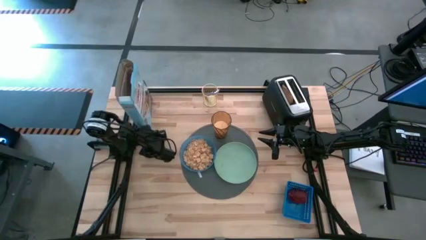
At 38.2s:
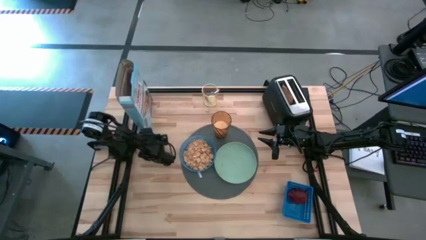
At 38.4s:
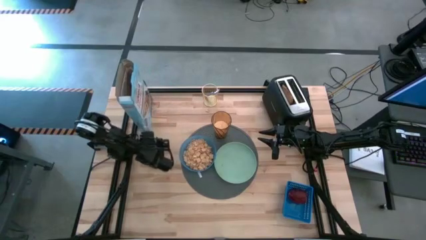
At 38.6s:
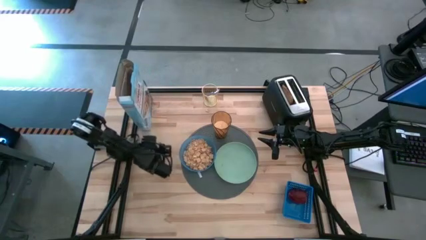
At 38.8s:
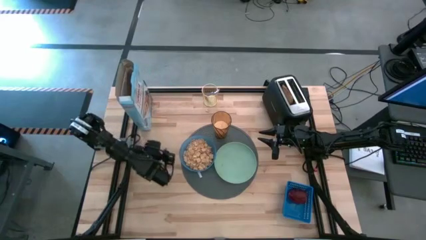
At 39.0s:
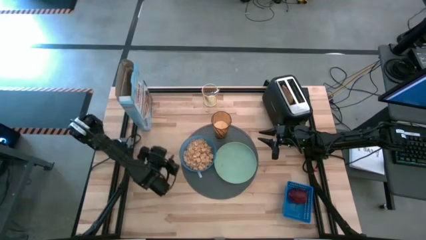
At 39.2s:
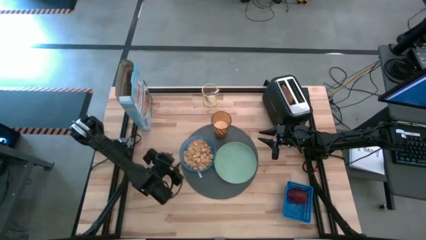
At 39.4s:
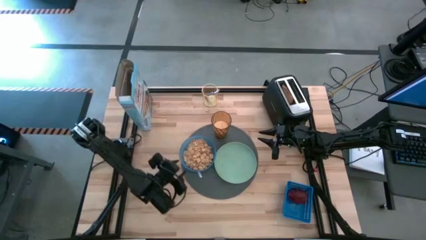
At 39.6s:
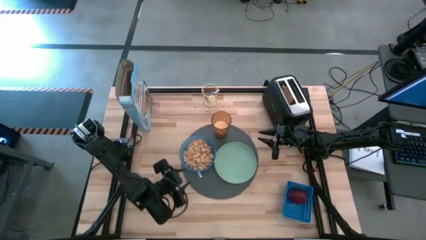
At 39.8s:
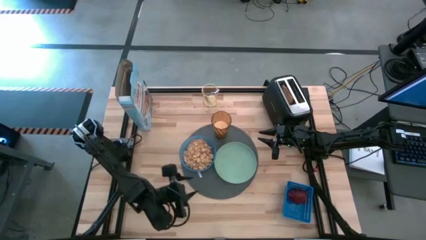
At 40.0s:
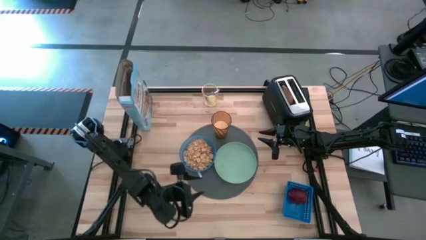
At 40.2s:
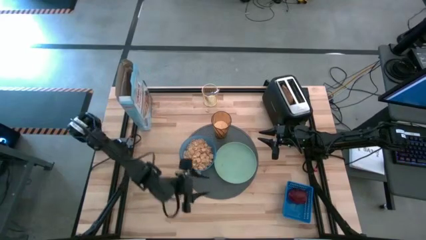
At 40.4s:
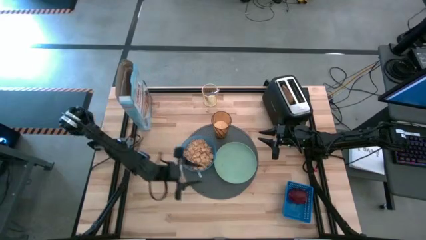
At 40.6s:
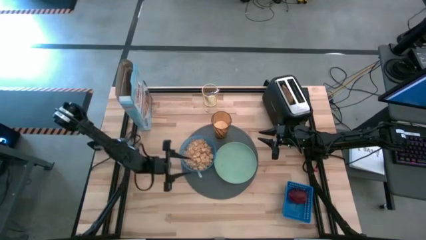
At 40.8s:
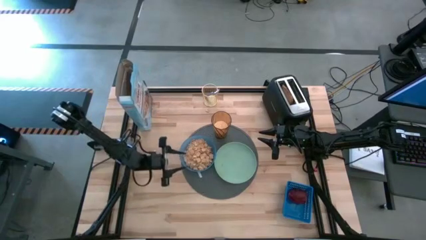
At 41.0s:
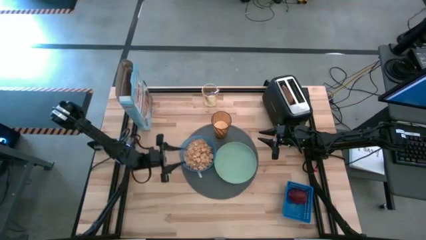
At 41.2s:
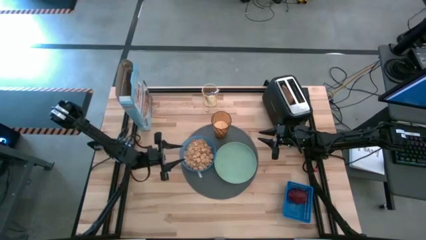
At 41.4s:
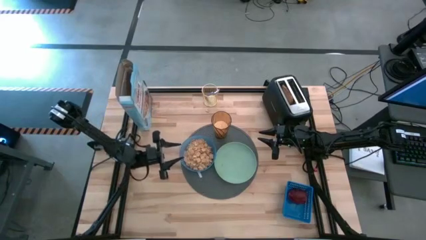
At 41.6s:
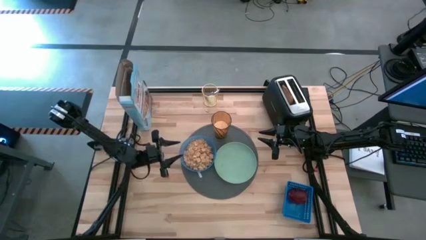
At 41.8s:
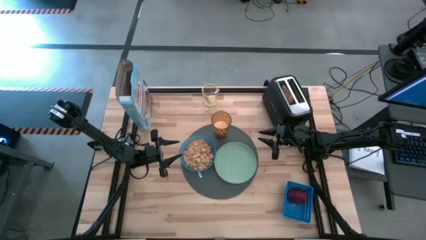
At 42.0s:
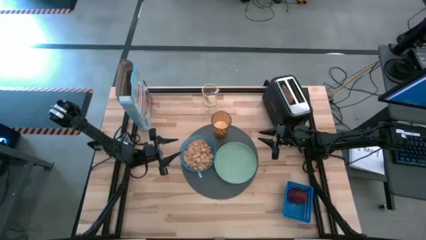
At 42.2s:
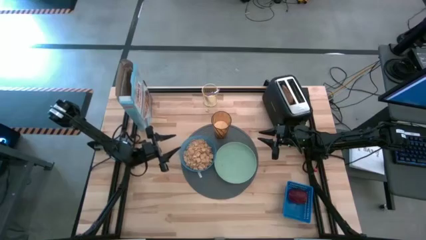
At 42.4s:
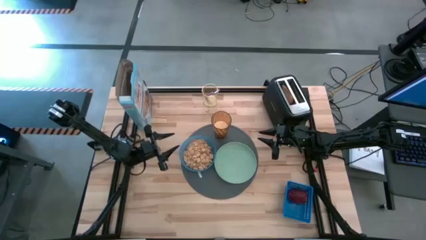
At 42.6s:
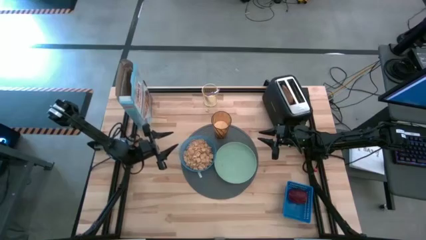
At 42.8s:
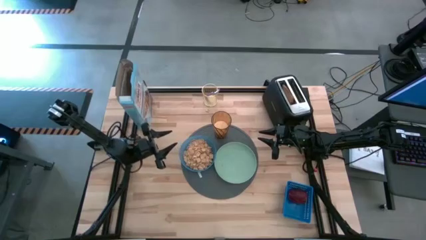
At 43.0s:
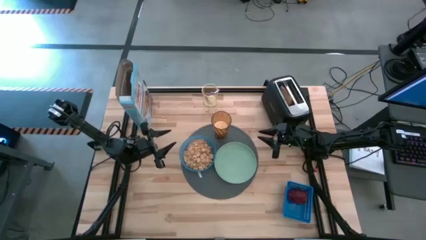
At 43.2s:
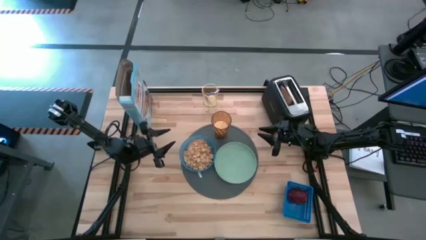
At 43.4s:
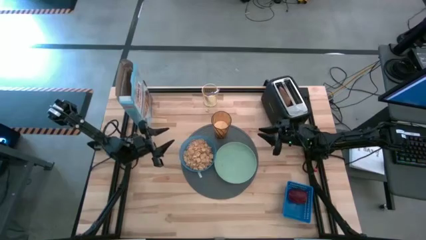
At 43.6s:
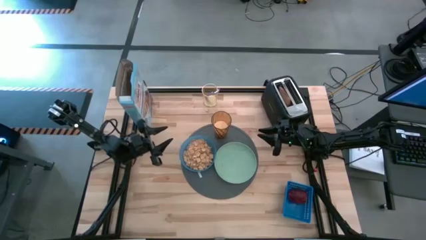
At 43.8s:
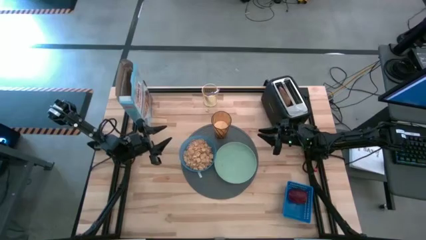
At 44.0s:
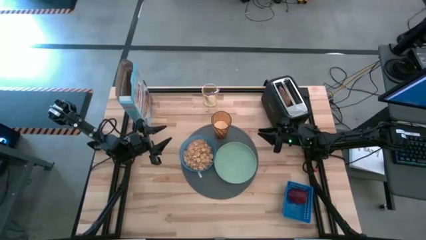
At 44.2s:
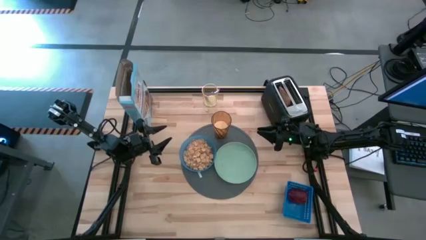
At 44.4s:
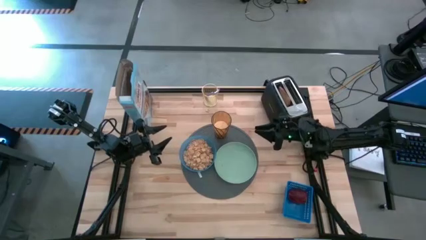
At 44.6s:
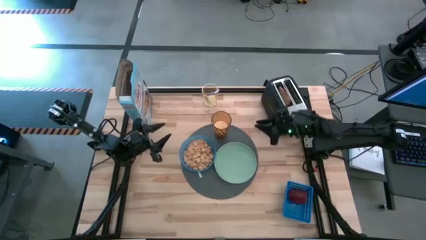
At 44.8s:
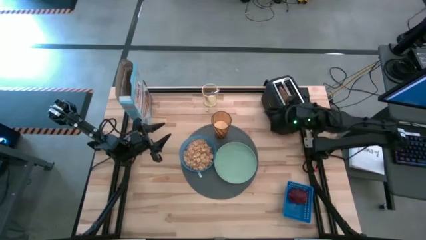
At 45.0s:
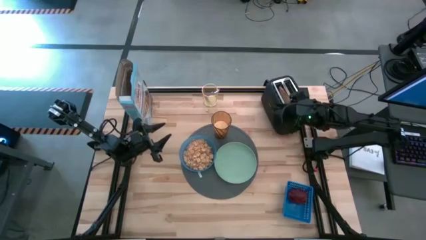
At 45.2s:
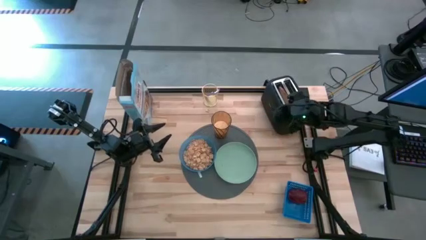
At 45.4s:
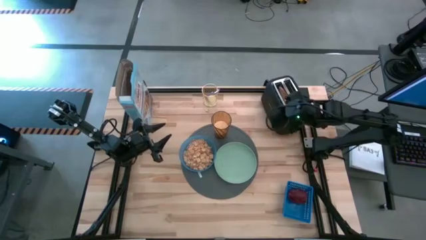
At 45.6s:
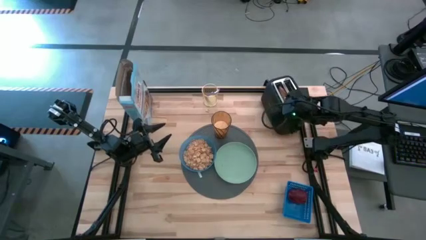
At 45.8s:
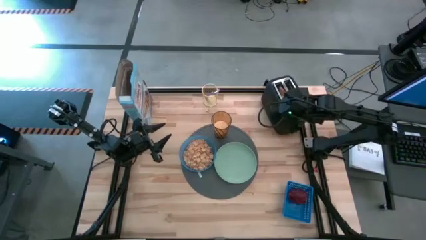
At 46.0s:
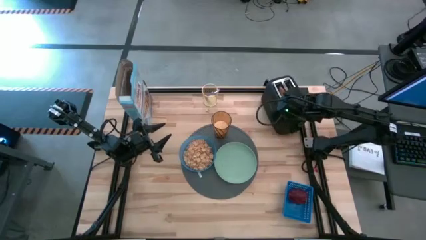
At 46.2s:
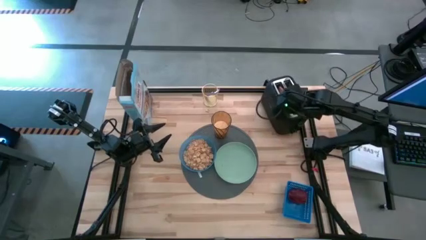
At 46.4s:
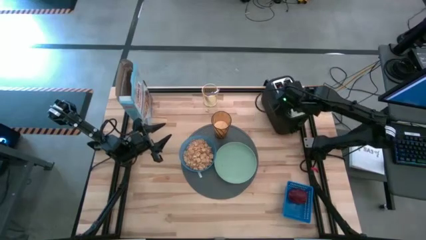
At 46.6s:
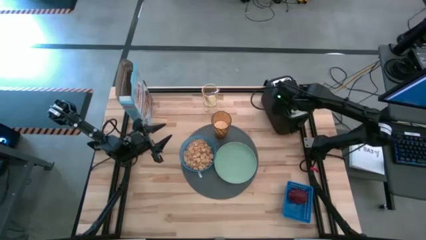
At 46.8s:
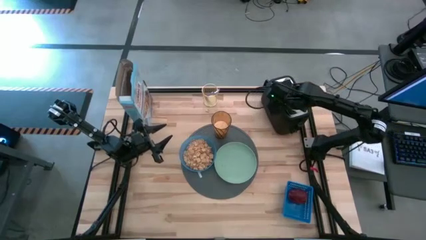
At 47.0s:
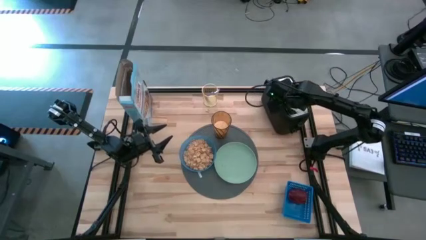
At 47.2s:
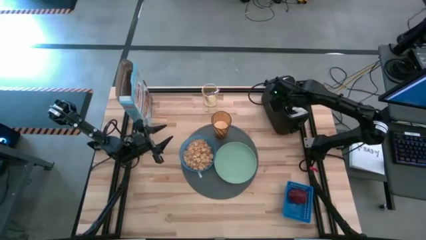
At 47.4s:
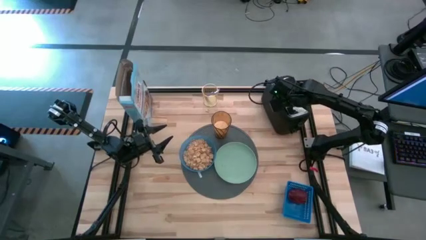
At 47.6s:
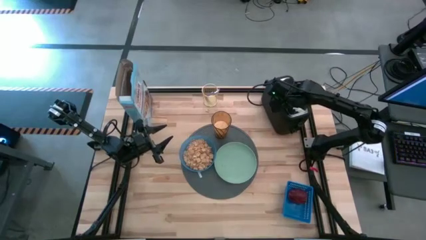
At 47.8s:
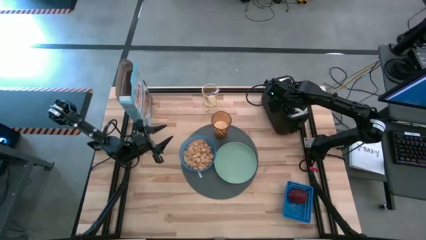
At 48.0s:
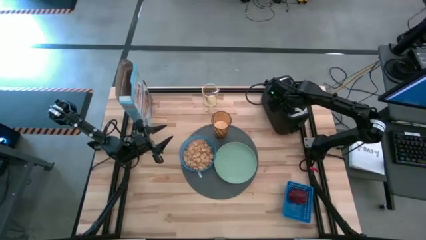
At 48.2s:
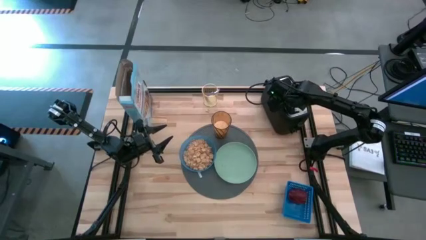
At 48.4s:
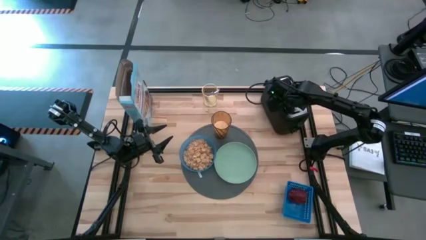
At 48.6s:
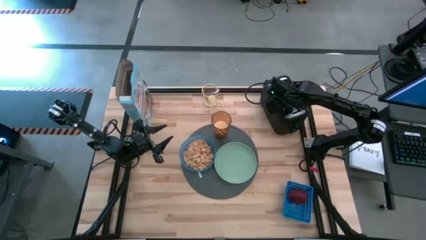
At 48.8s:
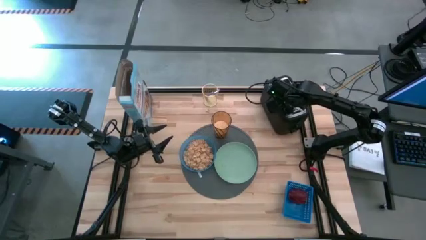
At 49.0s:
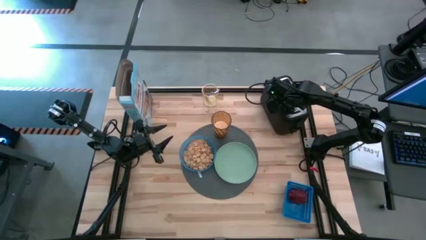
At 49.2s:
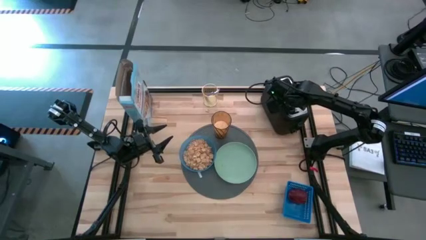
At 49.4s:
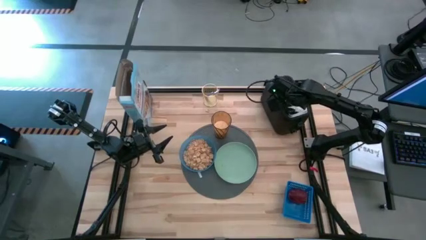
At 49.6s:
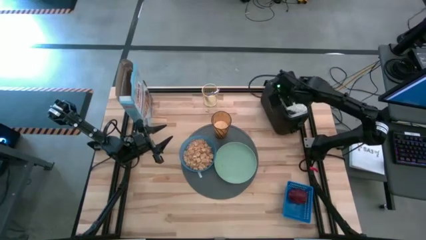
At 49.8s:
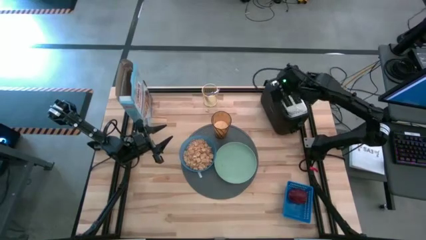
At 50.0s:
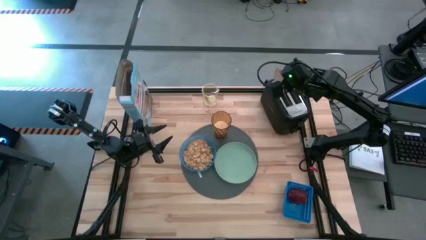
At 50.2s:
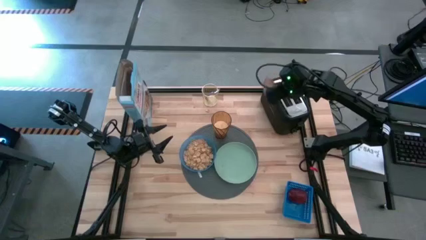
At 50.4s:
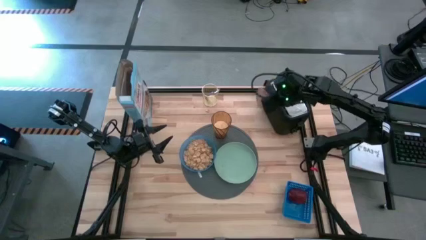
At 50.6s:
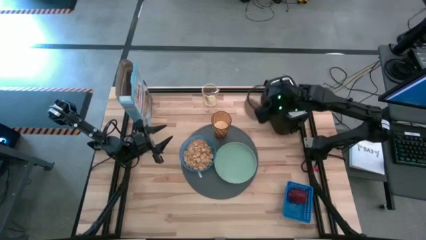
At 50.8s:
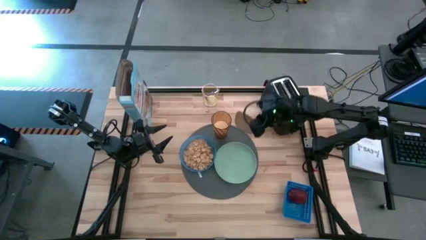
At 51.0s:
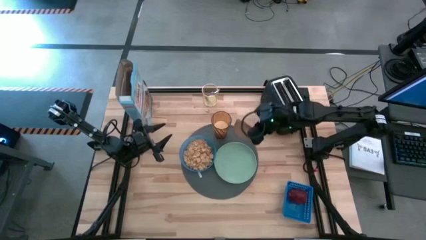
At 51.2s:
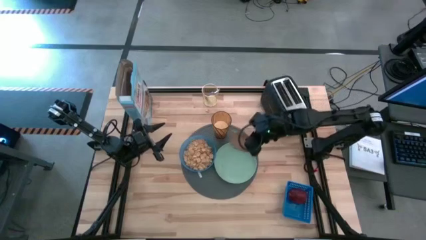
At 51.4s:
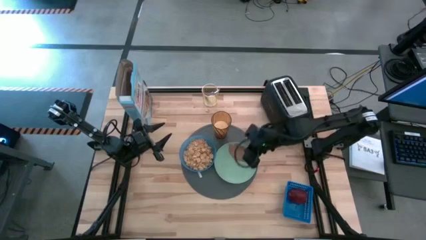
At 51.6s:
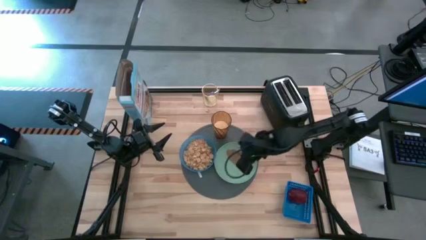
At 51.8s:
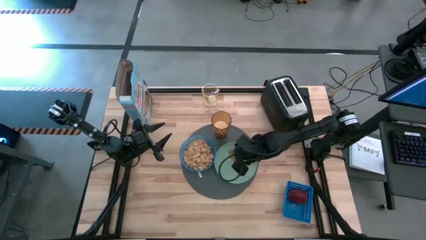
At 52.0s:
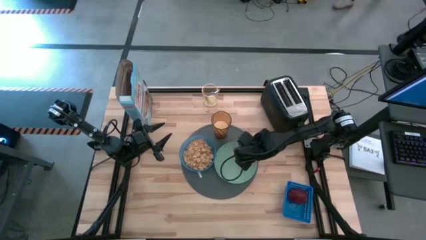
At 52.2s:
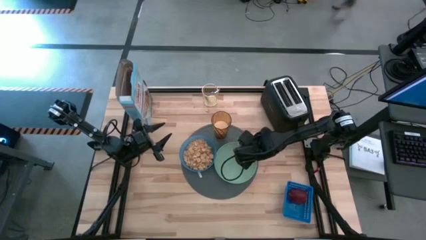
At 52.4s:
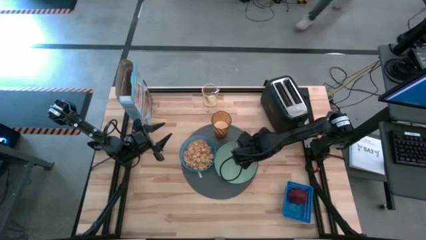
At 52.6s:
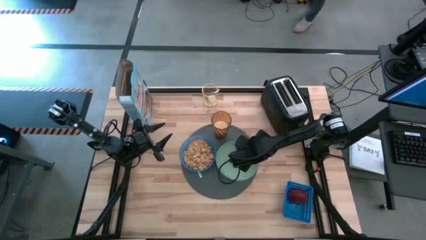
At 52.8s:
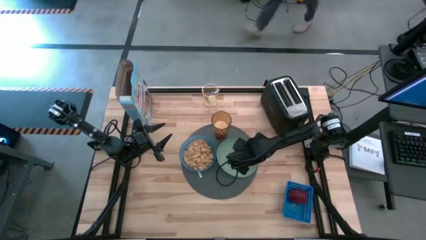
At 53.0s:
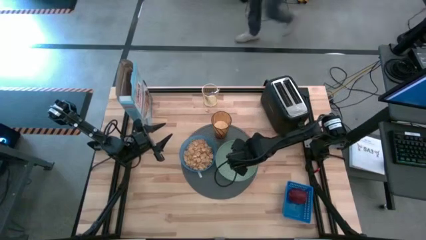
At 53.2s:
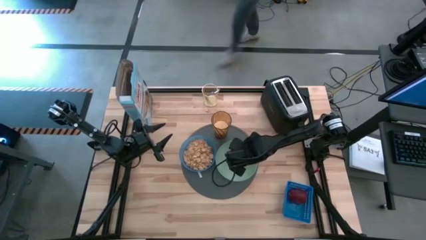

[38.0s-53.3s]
Task: Arrange a breakfast setting
Put the toasted bread on the green plate

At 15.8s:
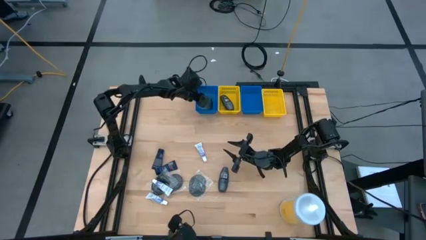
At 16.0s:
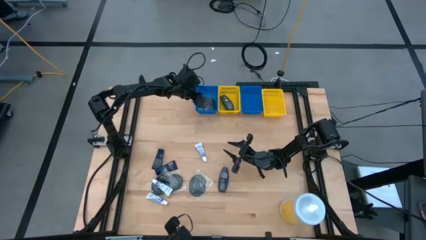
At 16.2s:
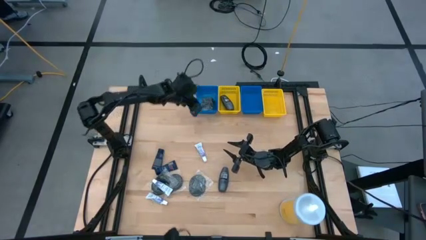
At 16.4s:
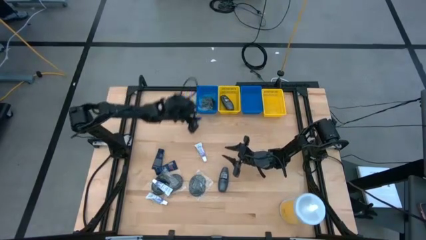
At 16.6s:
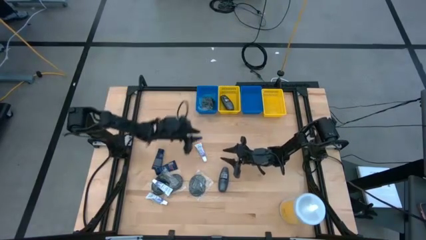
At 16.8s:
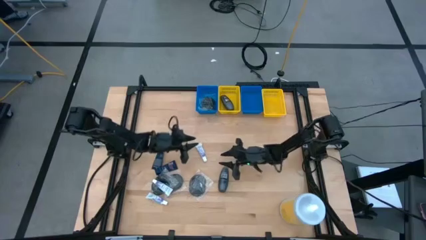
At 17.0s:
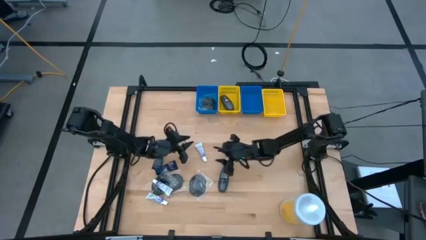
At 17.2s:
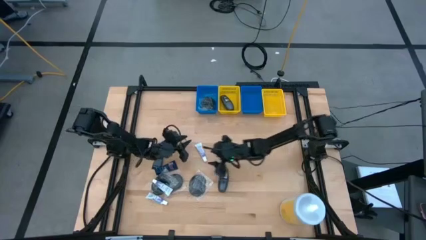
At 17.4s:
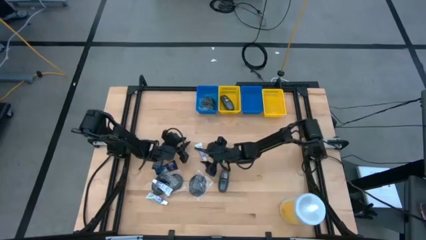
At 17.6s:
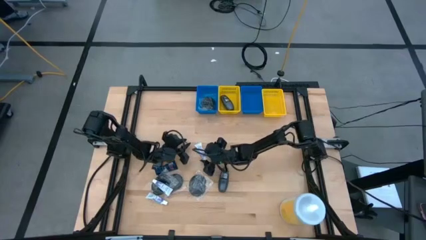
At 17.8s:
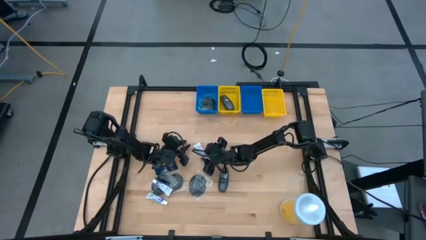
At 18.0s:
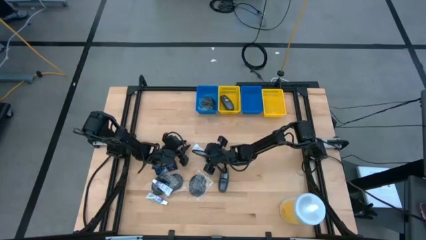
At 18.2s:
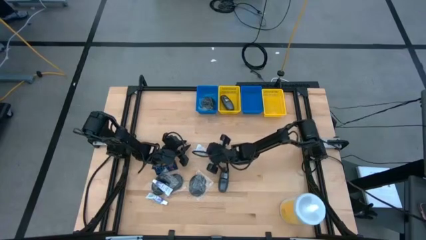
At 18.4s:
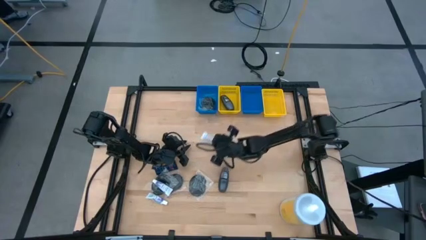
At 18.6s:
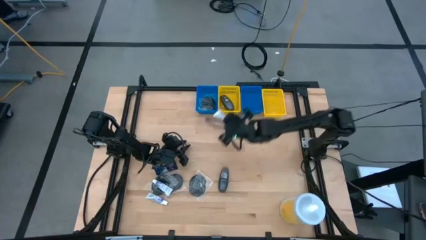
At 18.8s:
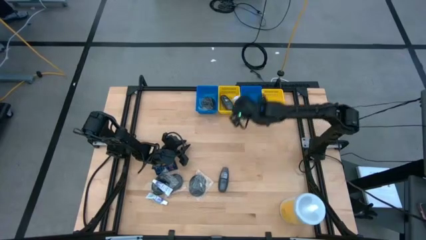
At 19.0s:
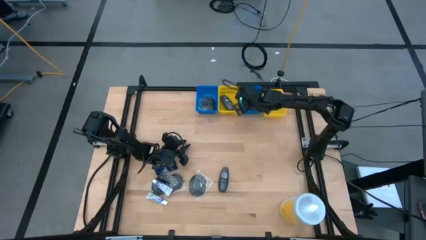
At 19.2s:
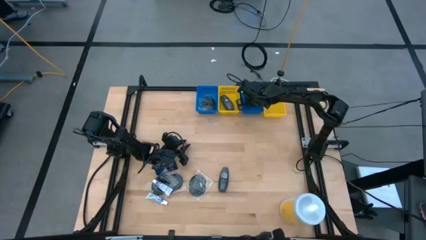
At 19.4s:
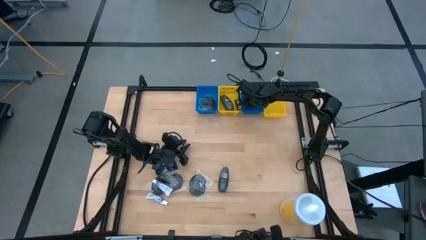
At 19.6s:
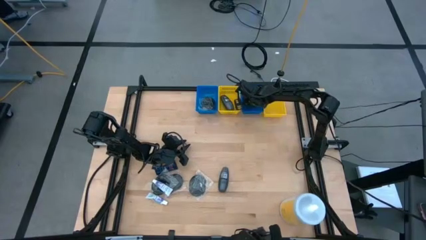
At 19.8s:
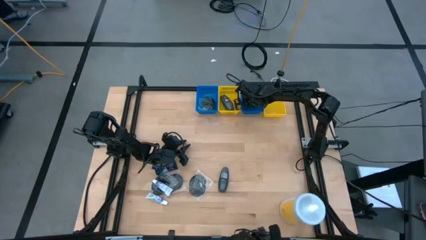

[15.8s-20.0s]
Task: Pick & Place Travel size toiletries
Put the white toothpaste into the right blue bin
